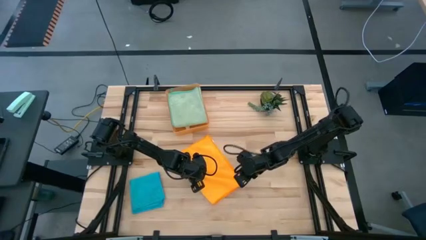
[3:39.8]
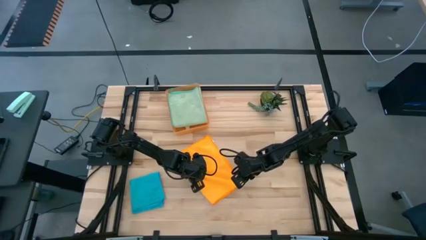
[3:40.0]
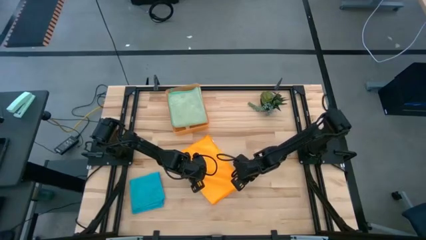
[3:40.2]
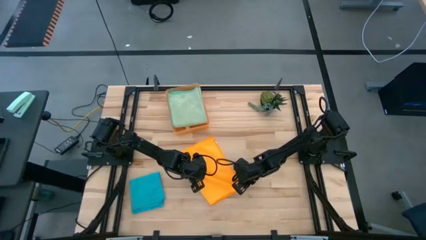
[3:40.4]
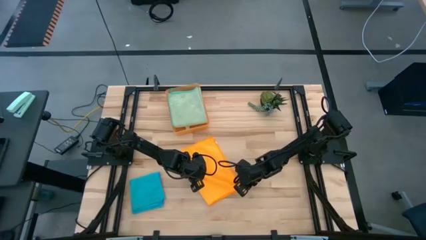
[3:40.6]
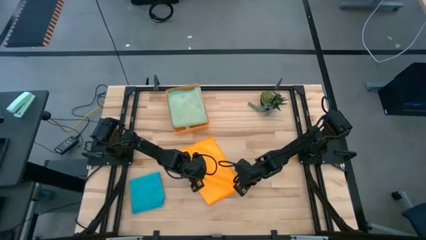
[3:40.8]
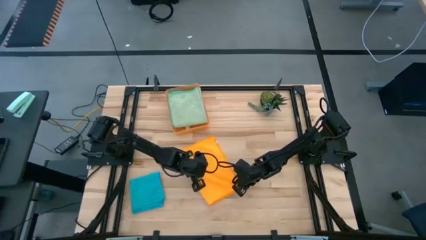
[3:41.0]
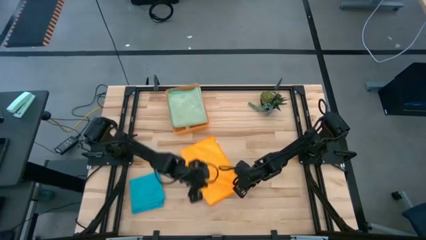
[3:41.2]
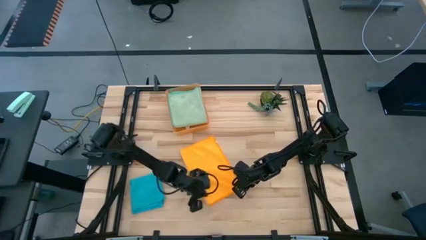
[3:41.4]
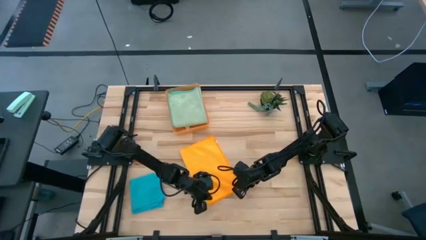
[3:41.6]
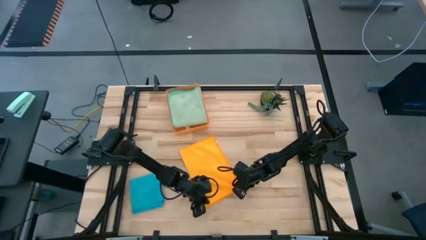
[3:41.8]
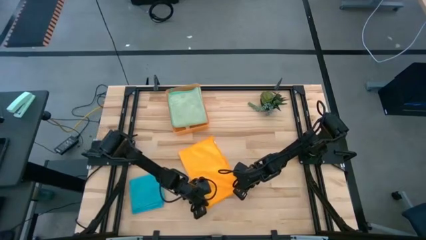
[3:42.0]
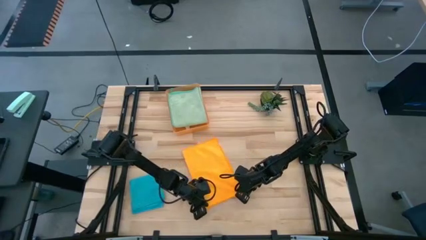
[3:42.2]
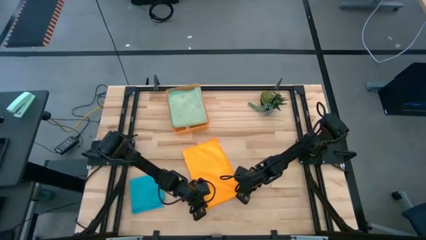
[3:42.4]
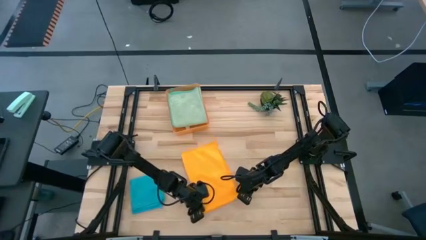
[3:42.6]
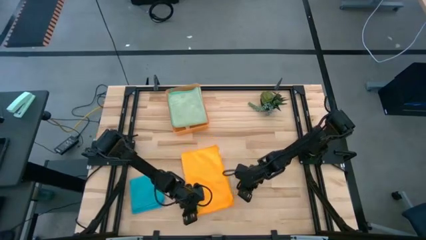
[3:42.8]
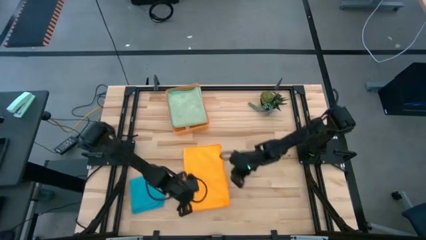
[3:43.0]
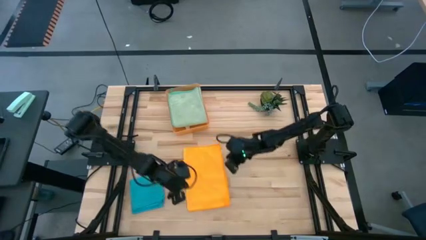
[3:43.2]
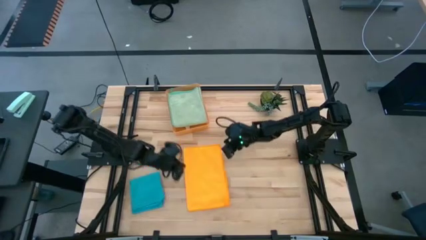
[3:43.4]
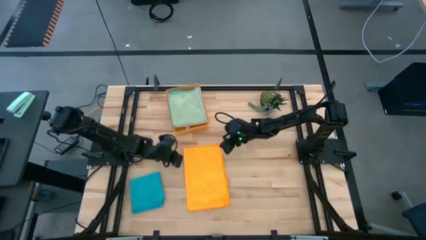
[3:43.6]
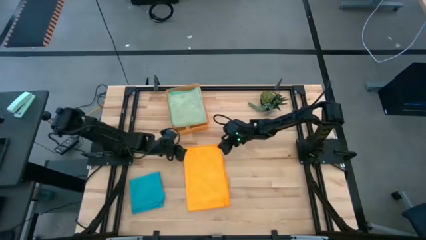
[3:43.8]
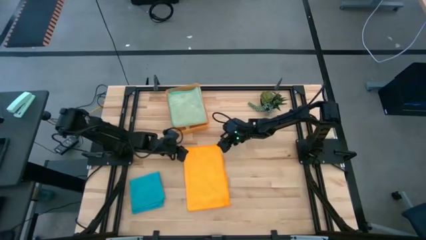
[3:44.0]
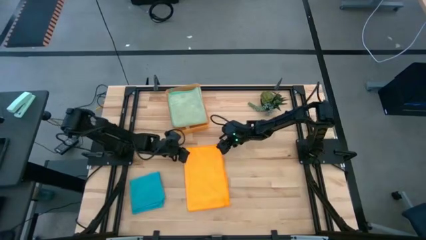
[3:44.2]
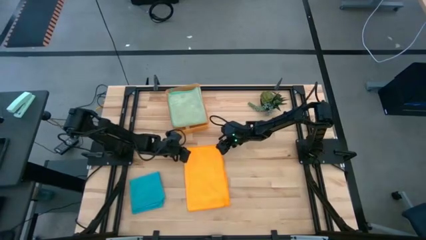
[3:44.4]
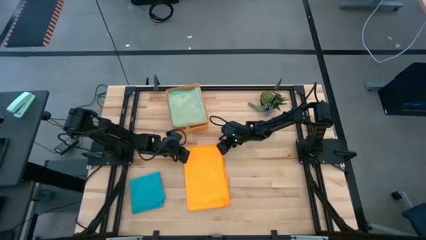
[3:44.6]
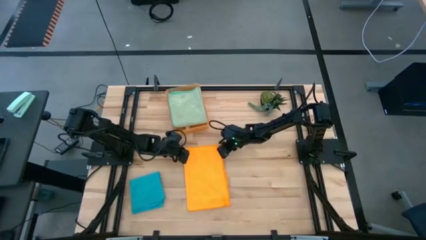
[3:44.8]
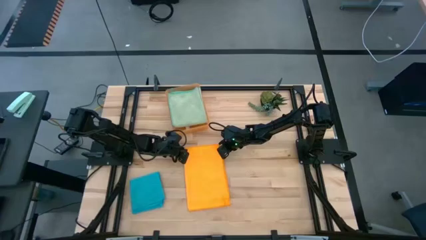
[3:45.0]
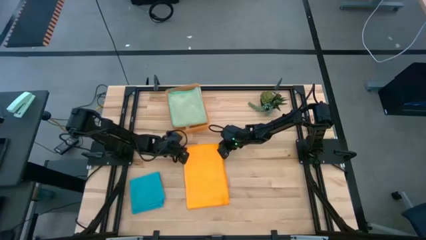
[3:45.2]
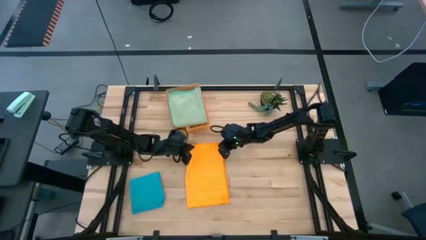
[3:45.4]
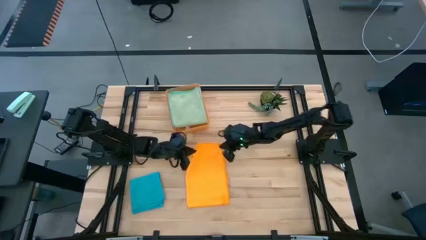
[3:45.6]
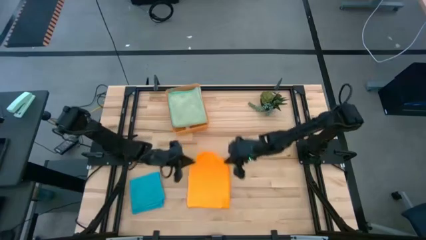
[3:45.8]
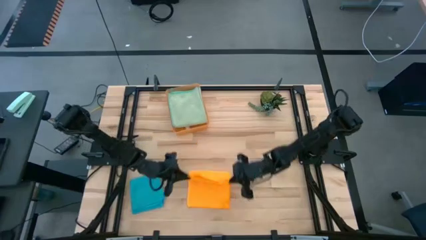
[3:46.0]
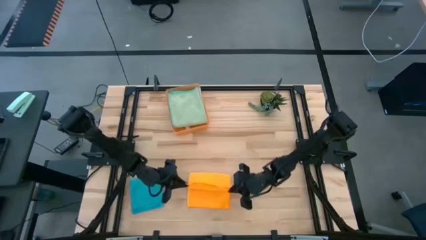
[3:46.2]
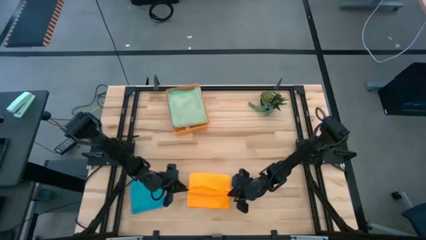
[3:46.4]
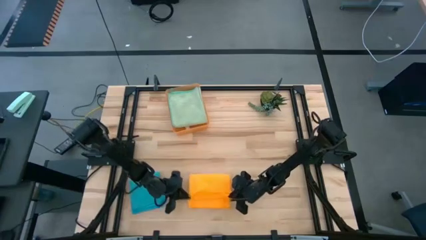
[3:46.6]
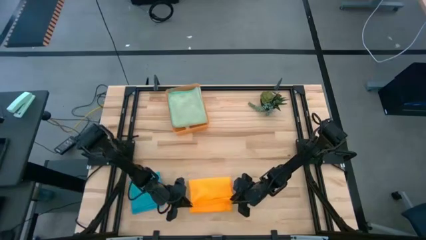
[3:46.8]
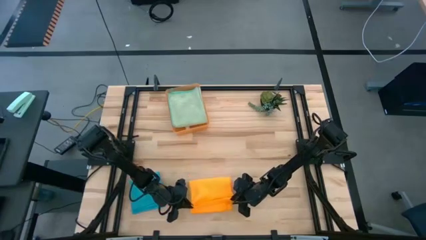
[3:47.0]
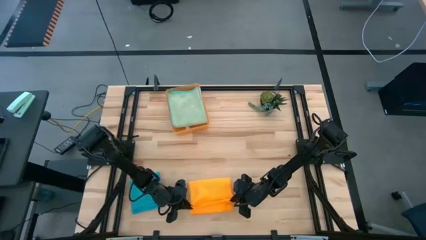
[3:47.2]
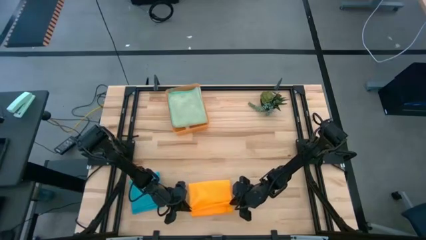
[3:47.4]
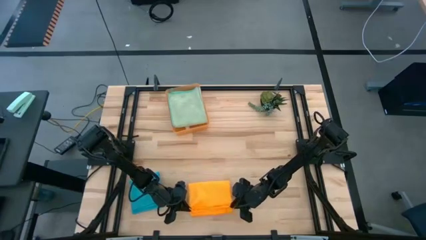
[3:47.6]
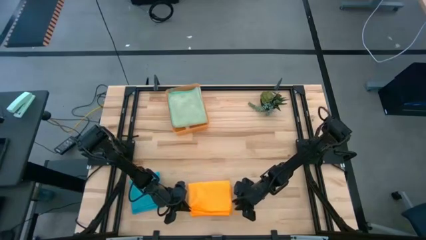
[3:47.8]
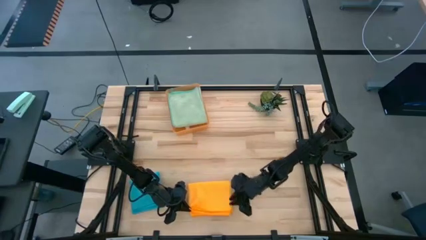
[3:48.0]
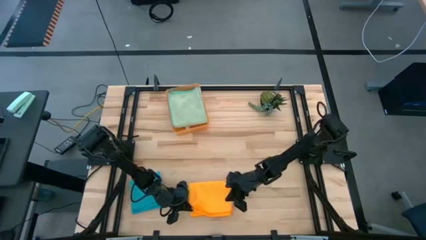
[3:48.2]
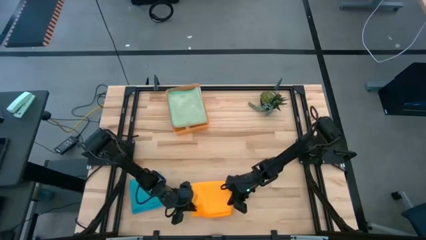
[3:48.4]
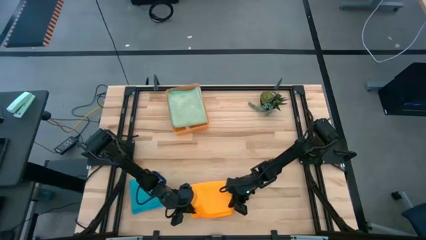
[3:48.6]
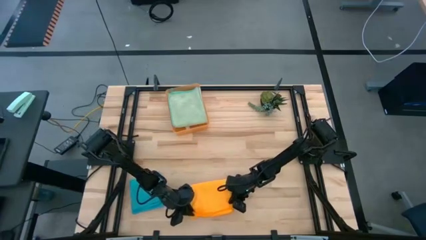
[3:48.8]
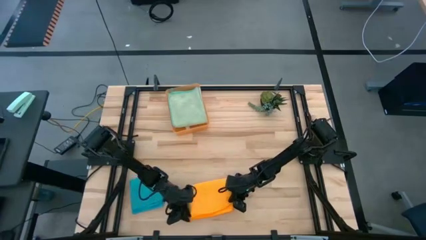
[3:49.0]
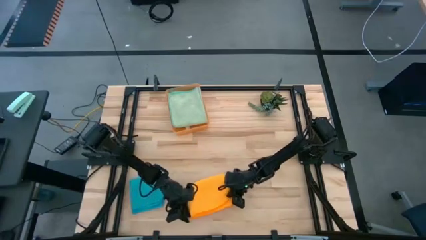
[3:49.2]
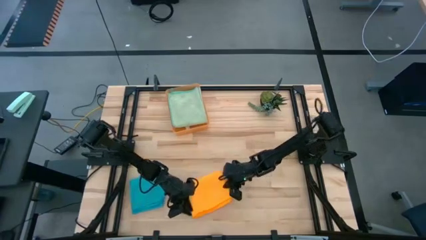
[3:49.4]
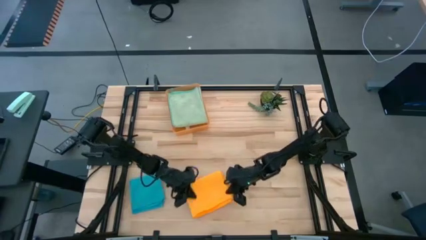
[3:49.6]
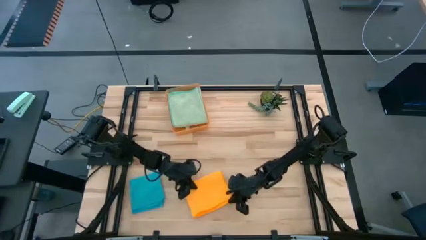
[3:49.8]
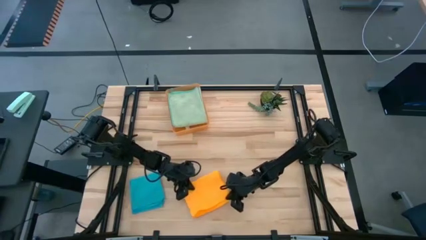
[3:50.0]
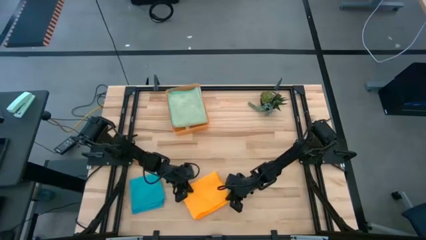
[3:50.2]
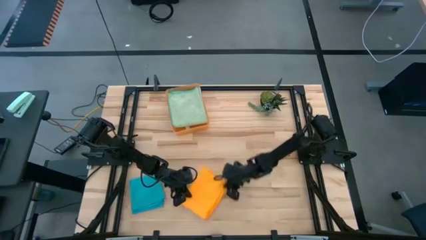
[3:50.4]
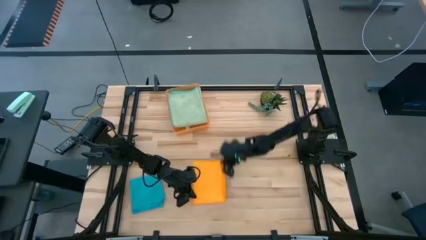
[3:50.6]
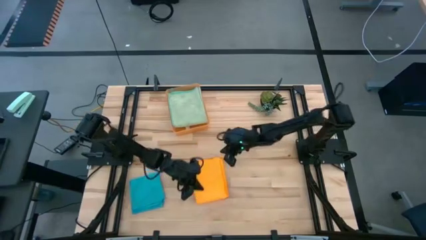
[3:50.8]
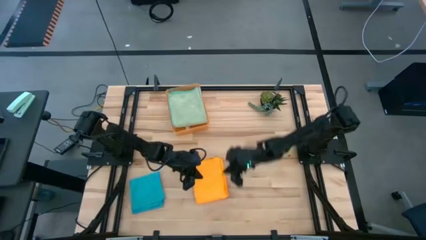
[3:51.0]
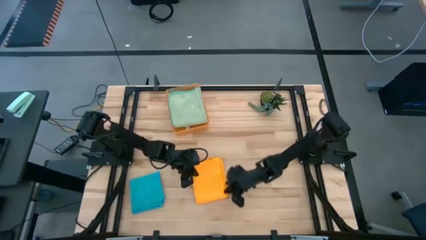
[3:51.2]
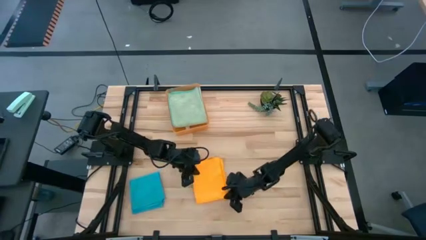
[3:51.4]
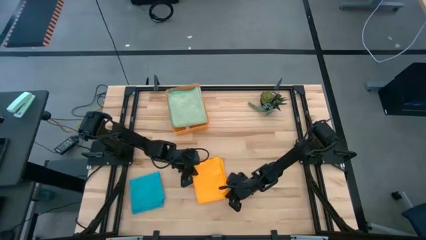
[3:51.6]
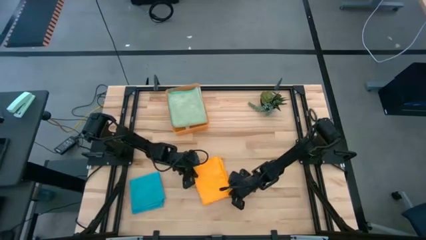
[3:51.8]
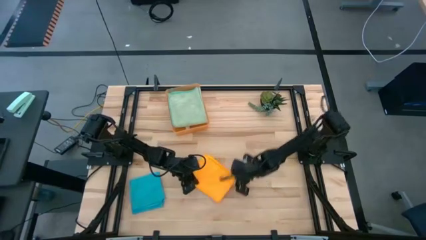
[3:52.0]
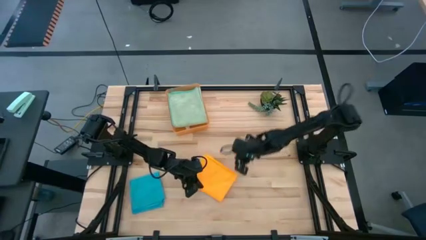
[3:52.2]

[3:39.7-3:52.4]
Task: Fold microfiber towels
Fold the orange microfiber cloth
